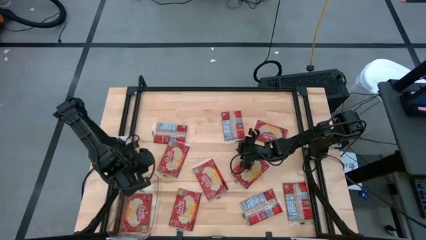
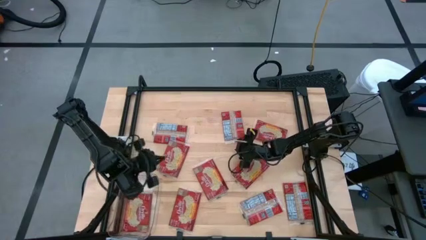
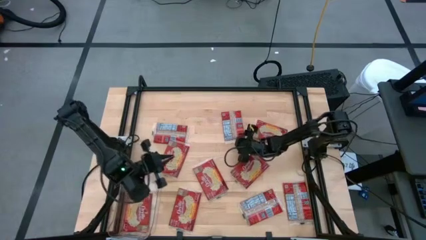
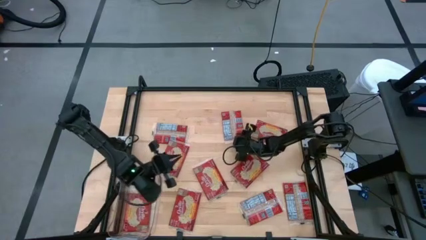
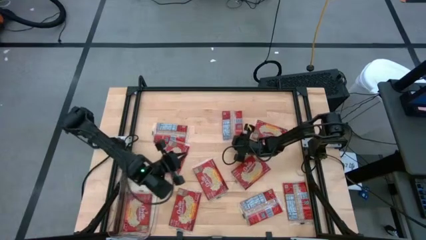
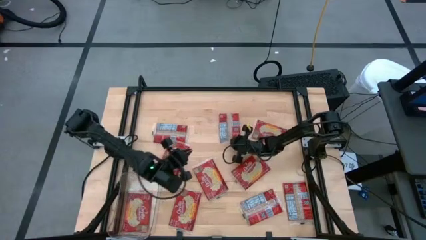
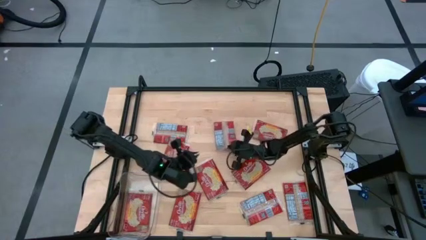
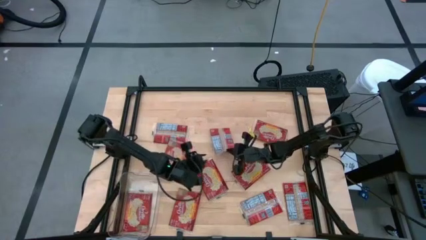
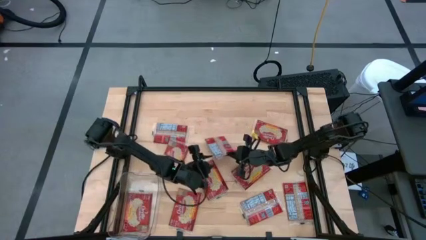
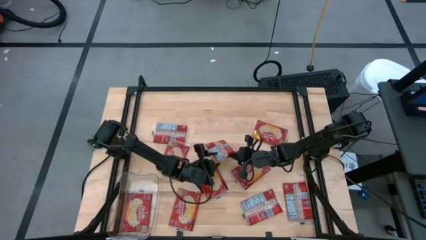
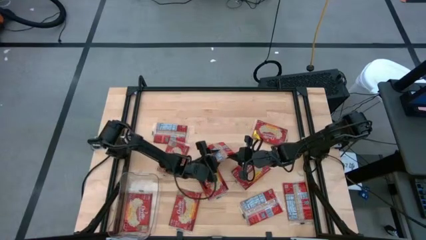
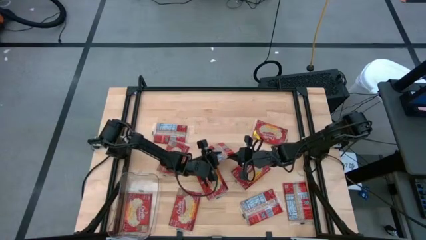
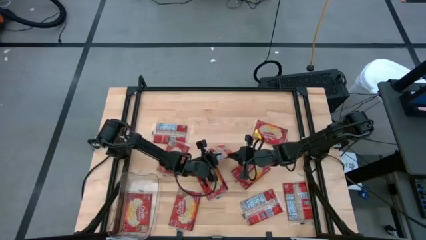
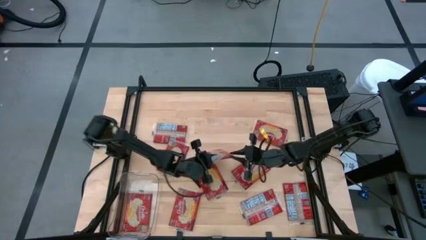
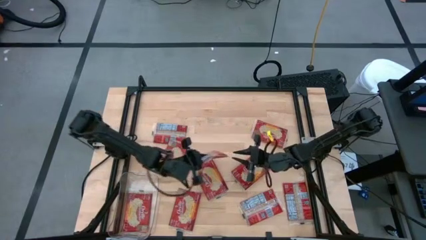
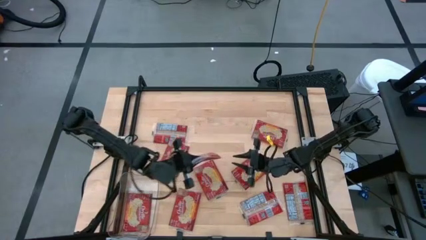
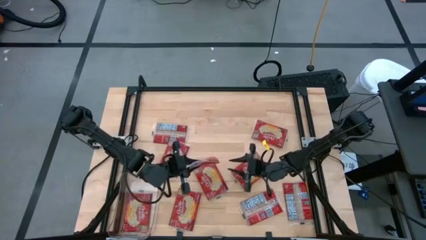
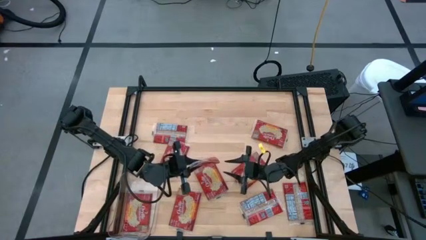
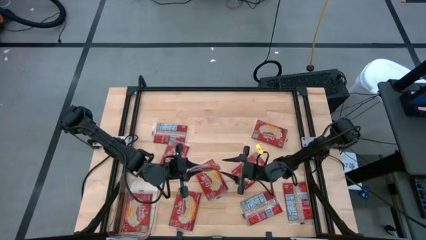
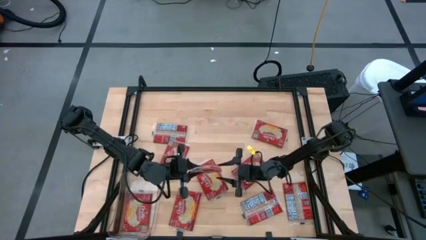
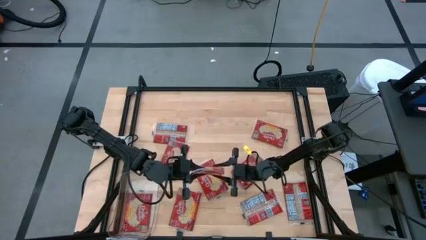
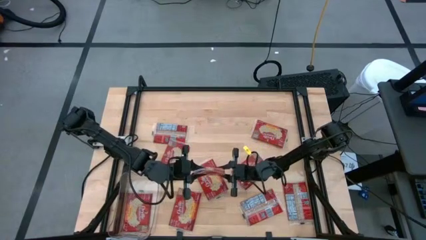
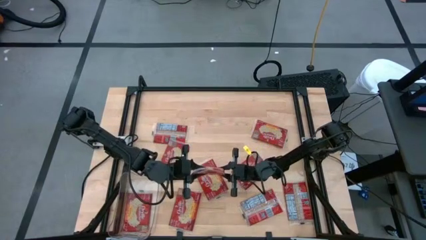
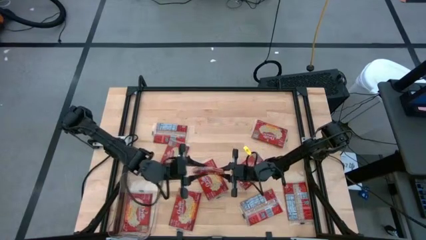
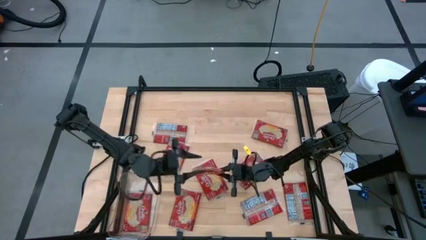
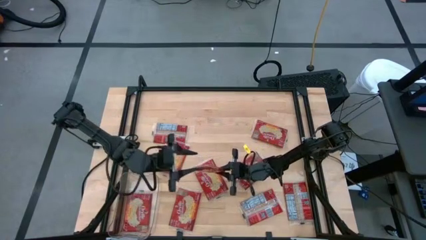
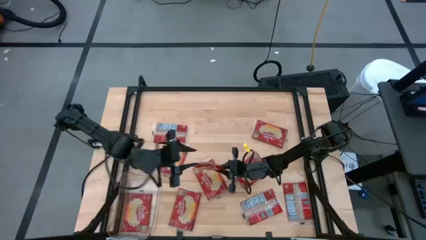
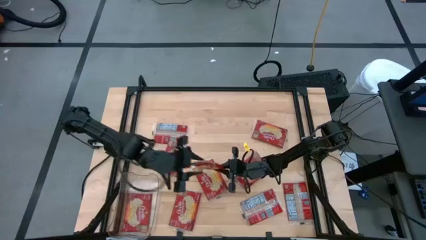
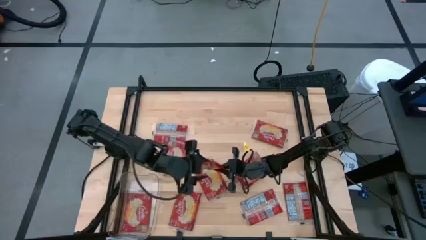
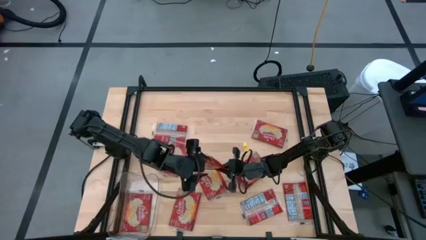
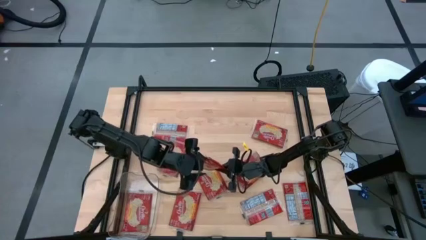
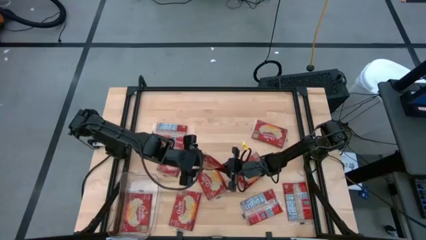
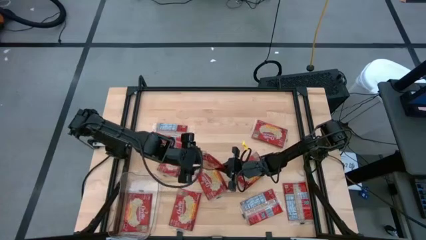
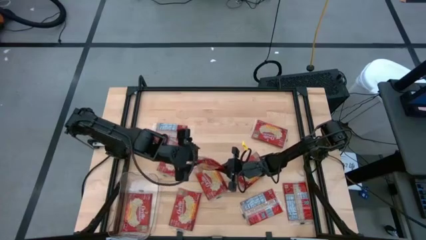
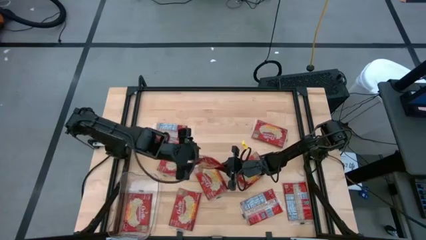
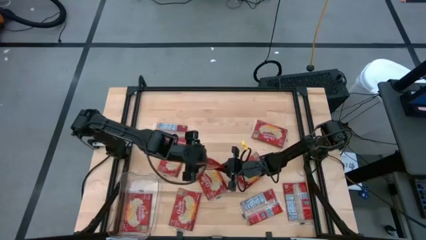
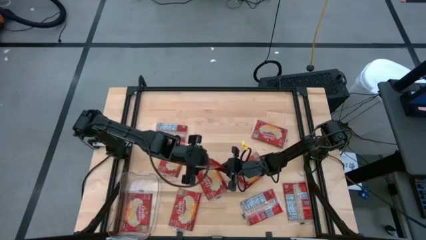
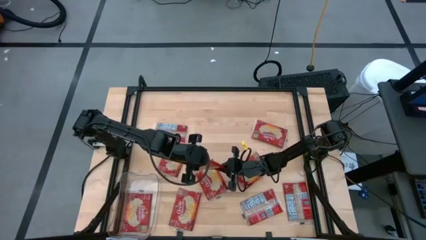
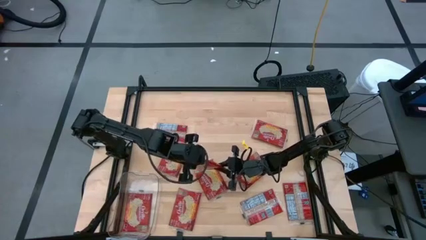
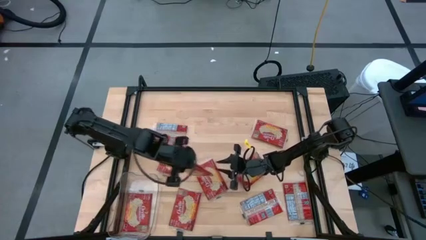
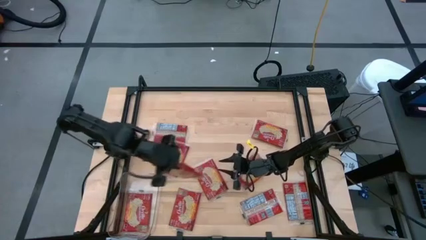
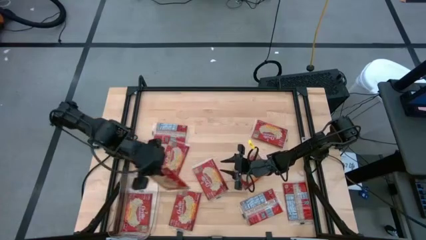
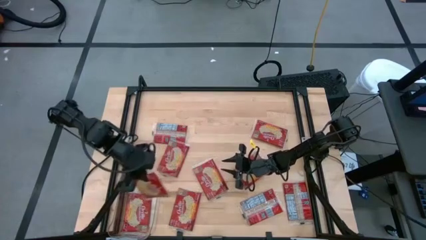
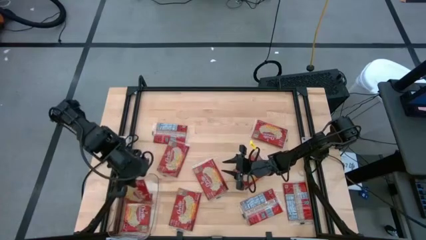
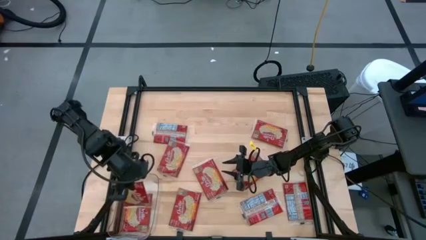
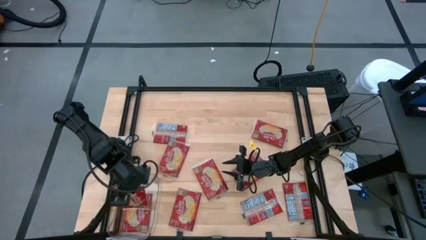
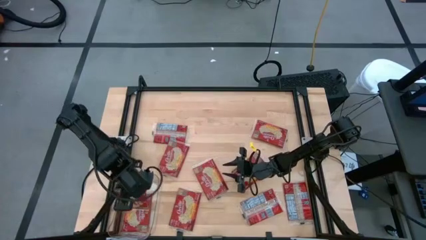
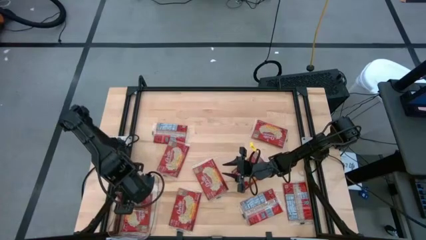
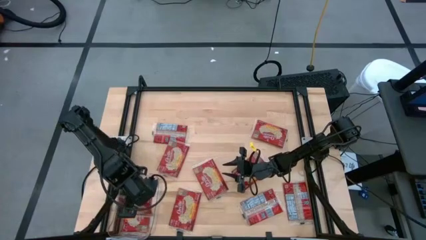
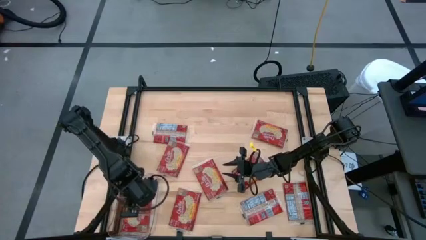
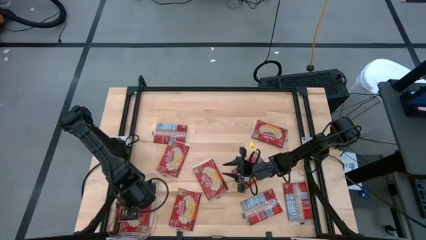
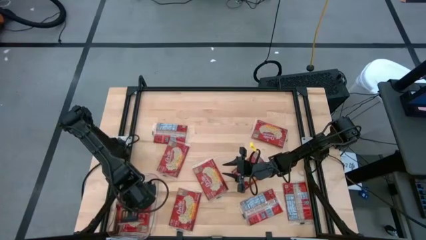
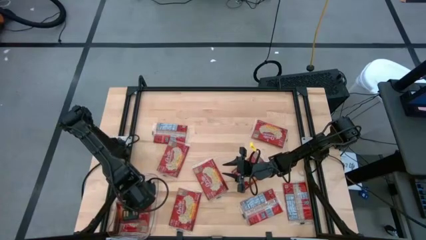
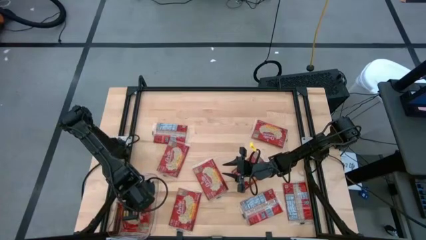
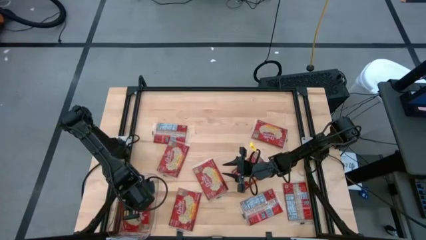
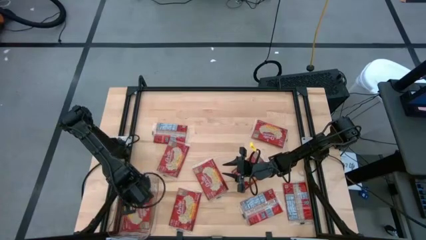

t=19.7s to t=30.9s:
Task: Sort popcorn bags into baskets
Put the popcorn bag into the transparent bin

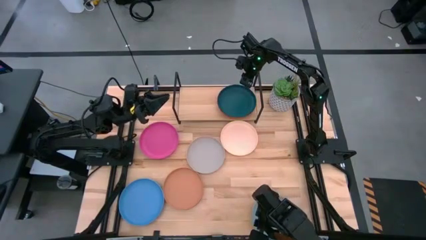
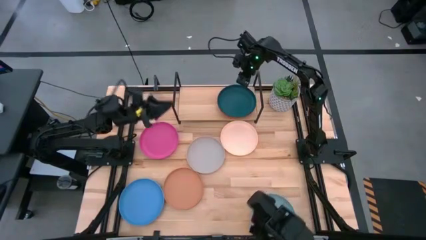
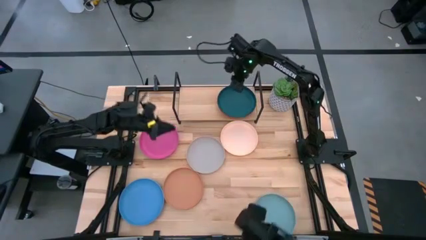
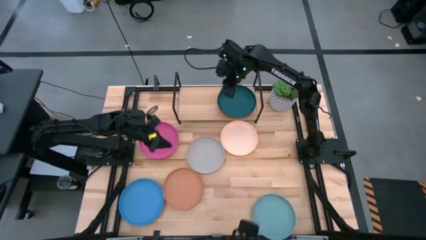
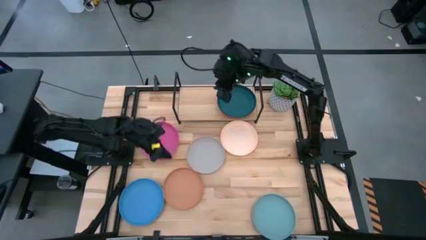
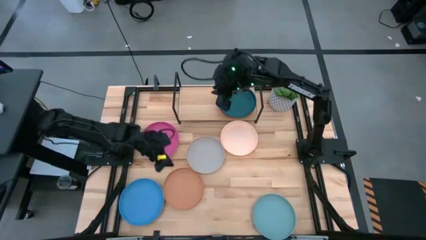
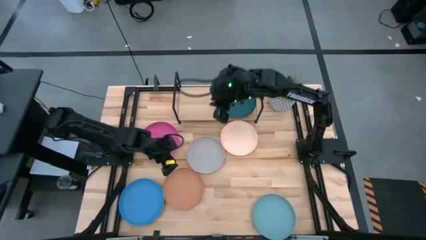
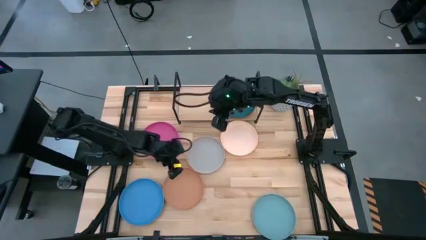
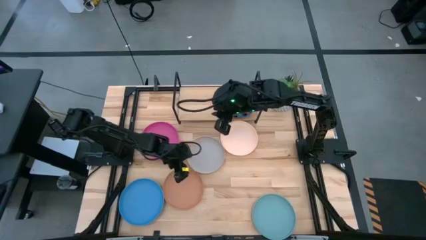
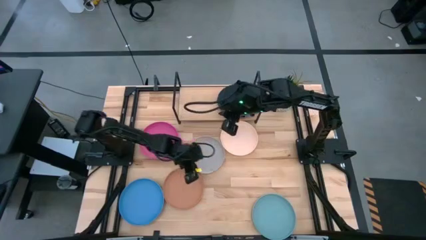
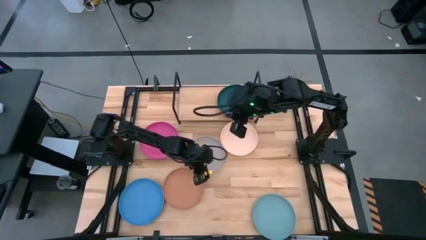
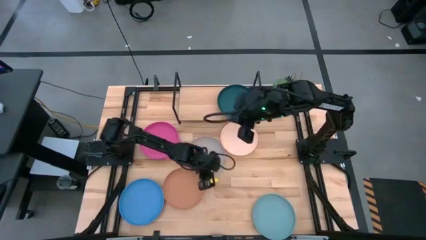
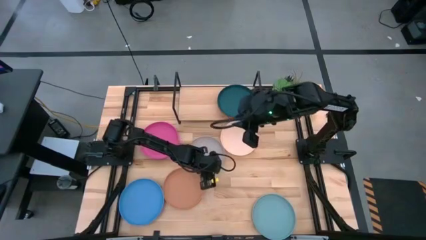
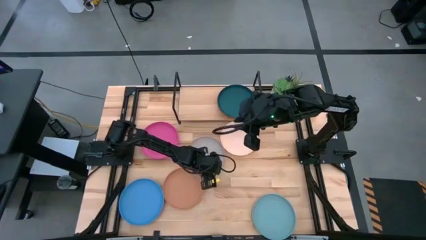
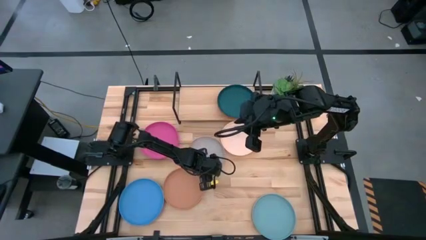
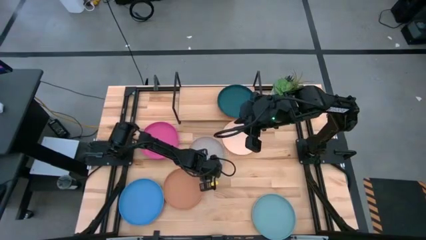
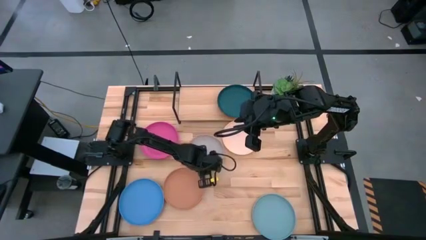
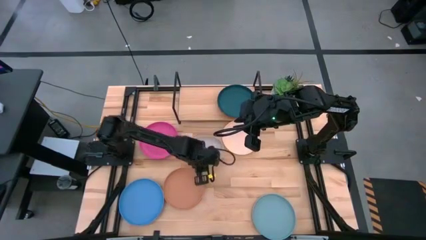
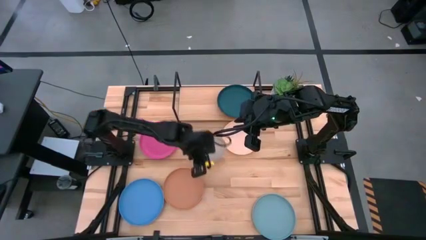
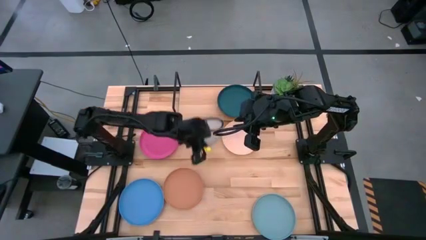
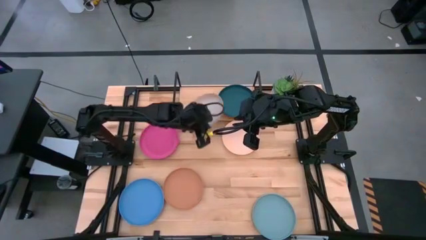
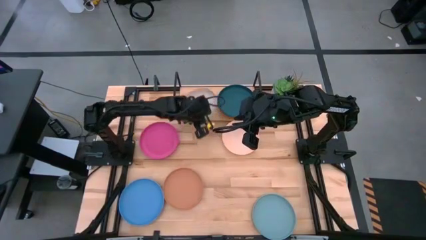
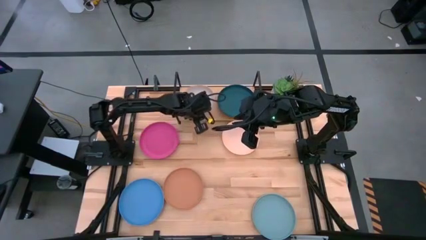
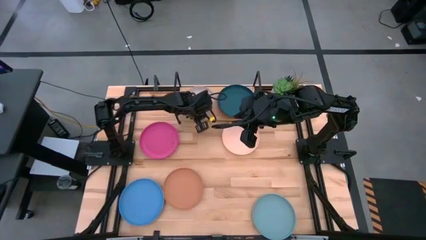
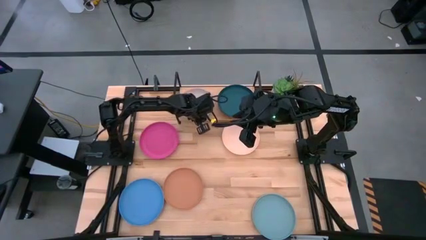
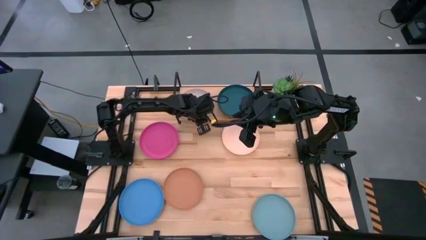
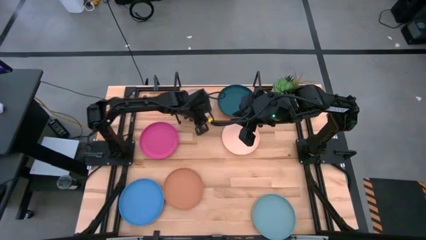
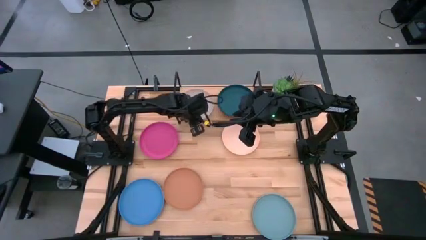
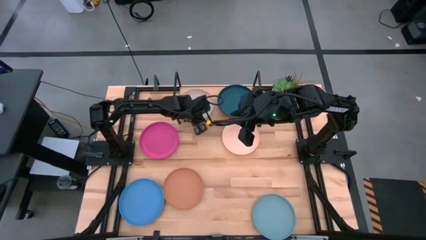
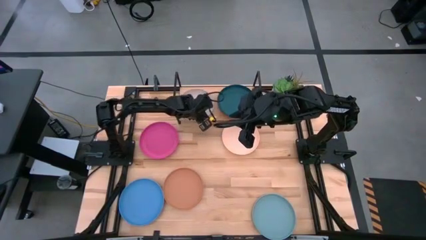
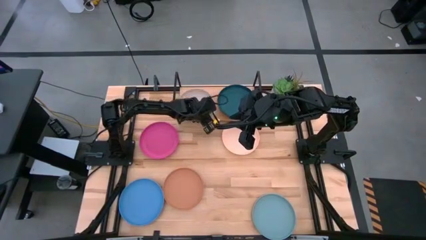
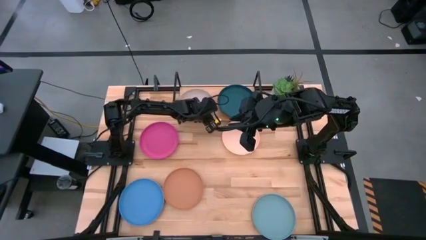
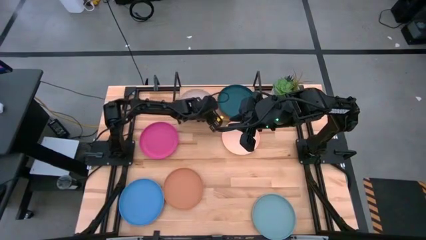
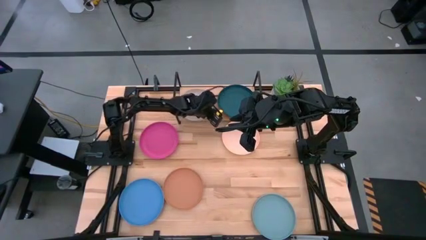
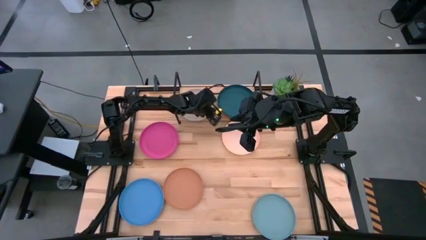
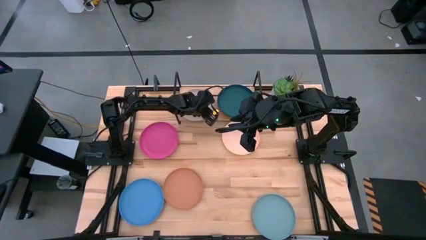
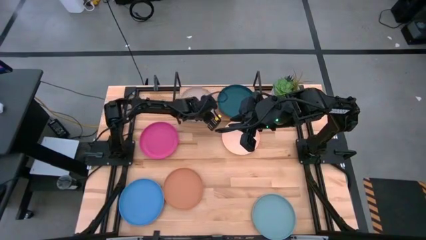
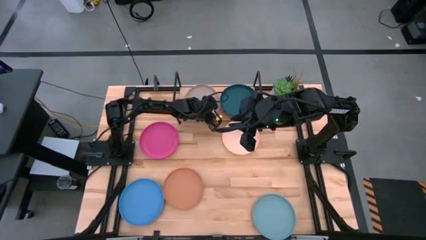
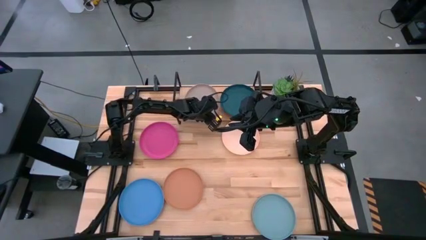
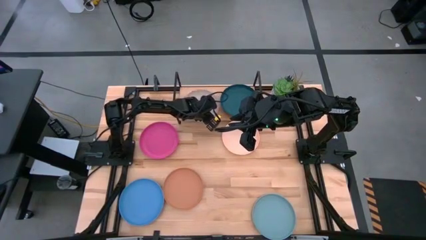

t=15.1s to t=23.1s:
Task: Place and stack plates onto a shelf
Put the gray plate on the shelf
